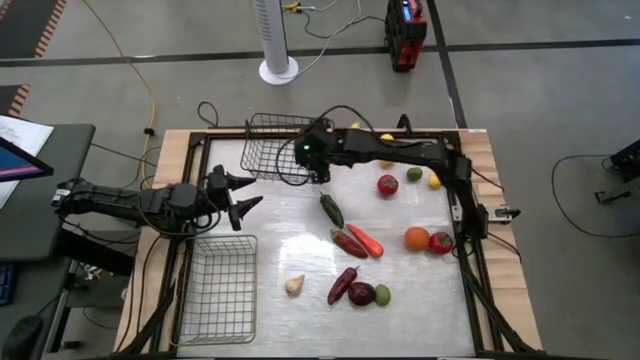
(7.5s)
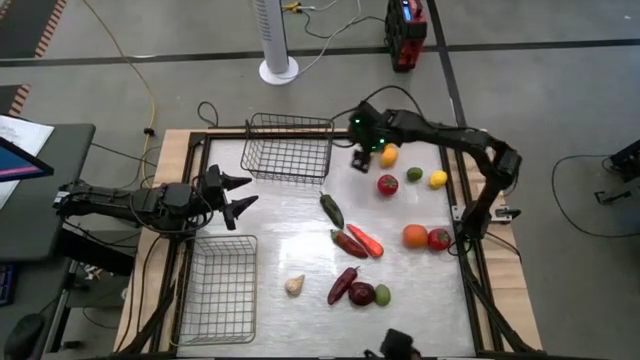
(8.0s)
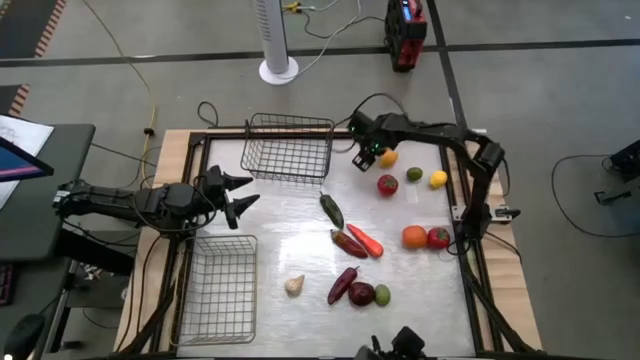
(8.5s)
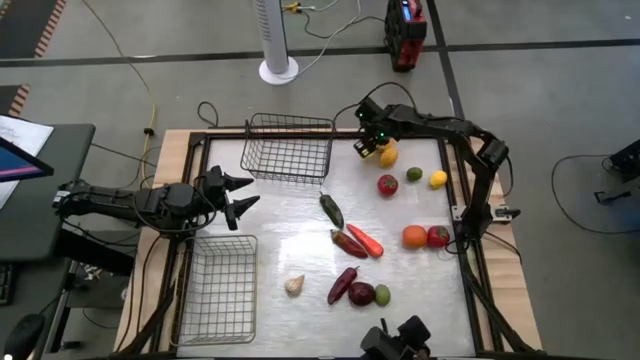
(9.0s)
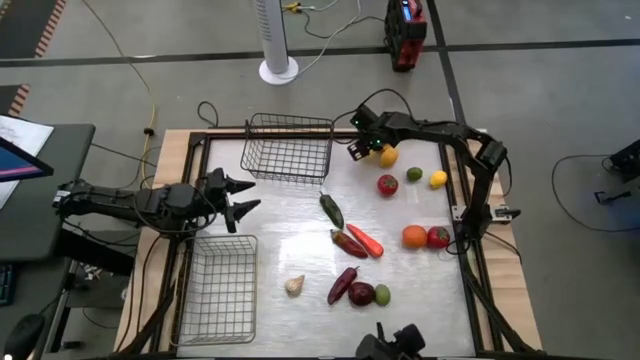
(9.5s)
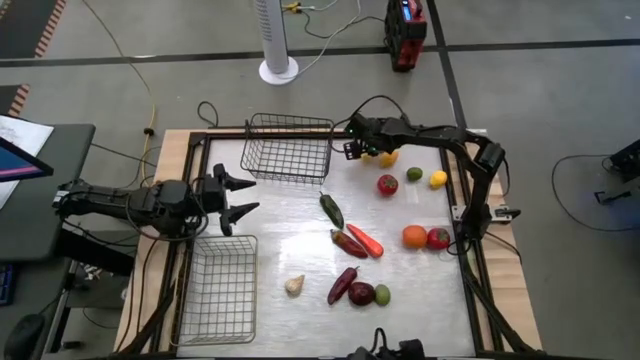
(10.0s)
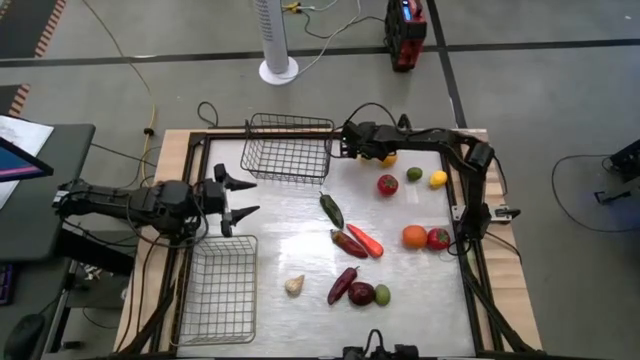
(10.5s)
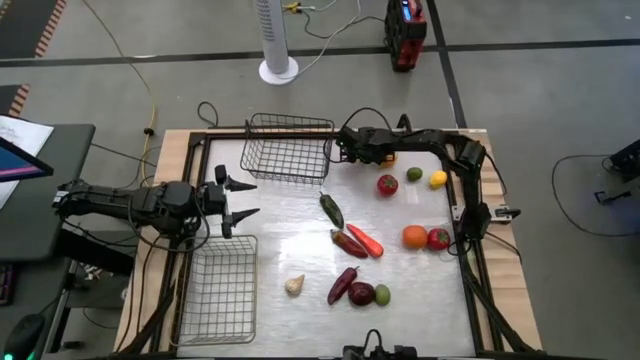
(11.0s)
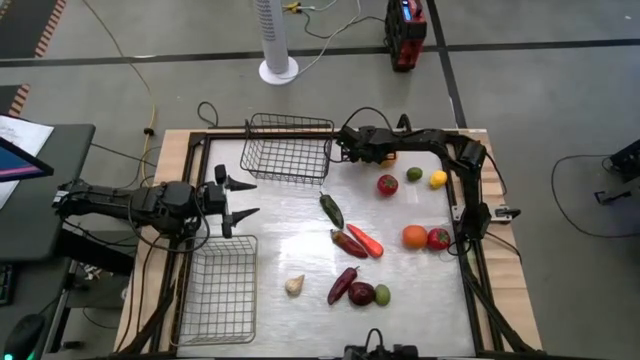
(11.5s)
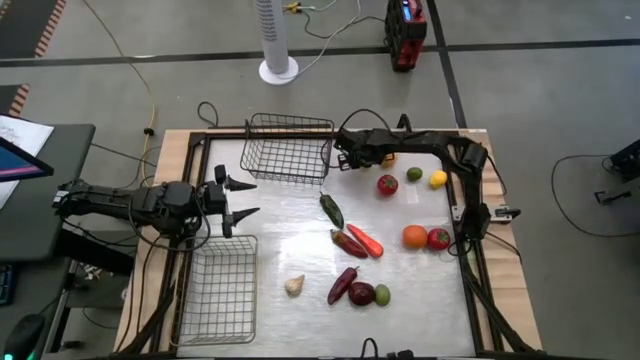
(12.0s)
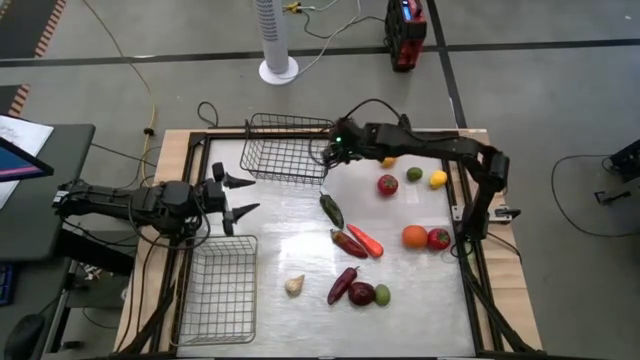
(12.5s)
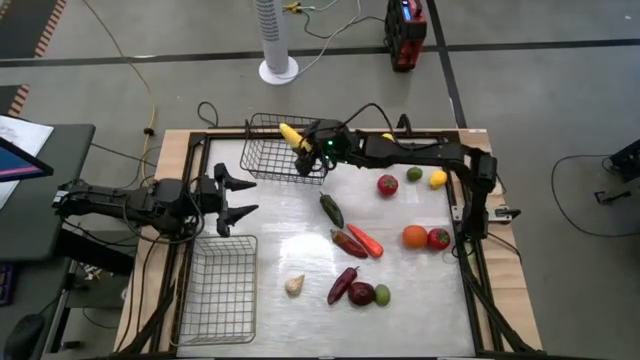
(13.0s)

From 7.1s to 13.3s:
Task: Sort produce into baskets
Put the yellow corn into the black wire basket

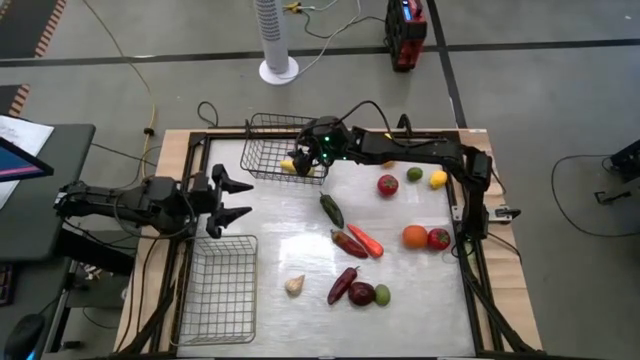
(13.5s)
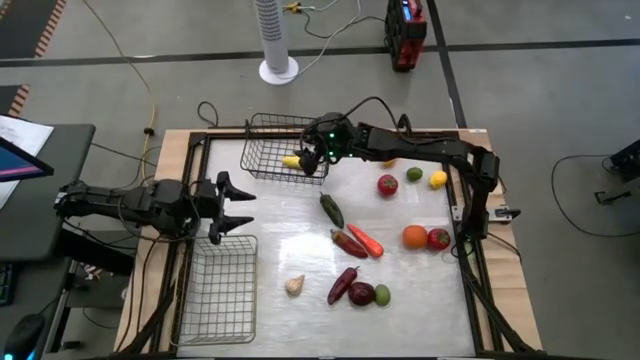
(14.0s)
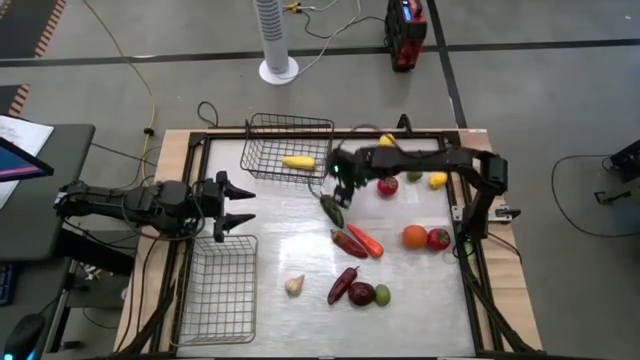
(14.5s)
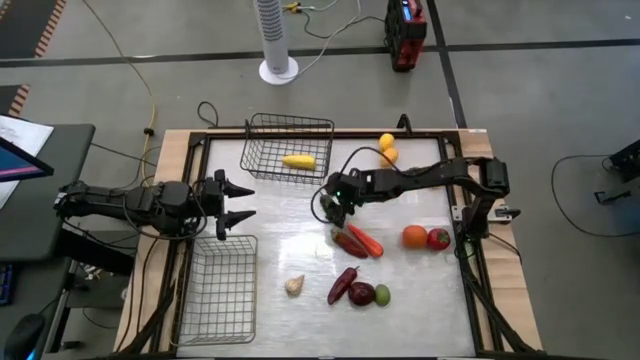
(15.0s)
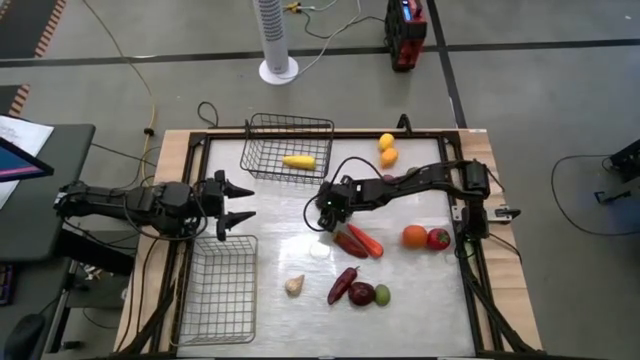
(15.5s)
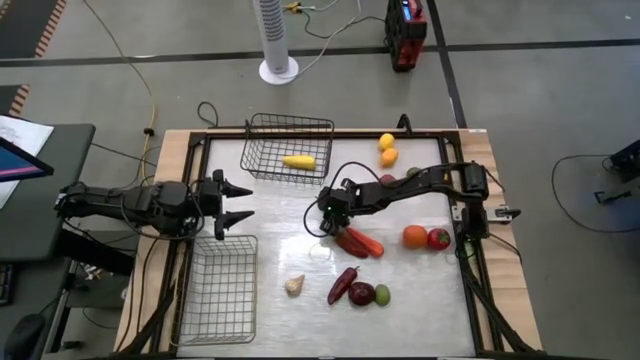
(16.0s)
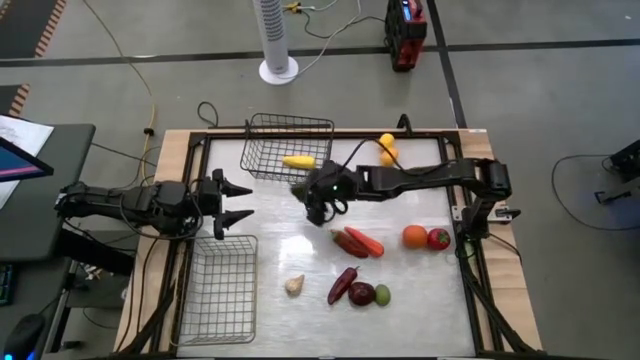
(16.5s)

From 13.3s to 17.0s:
Put the green chili pepper into the black wire basket

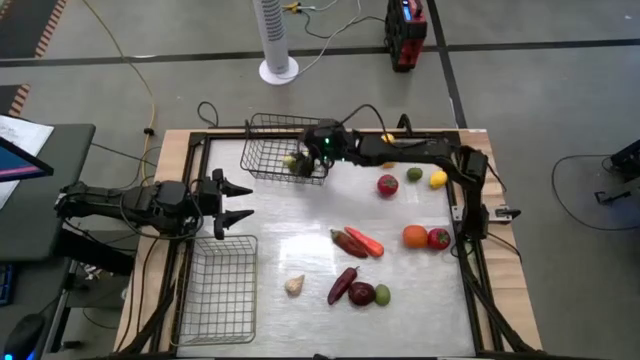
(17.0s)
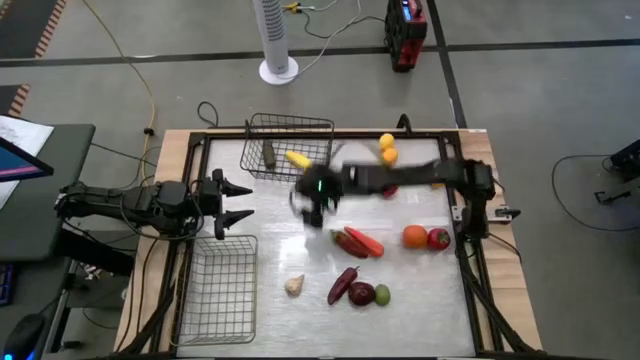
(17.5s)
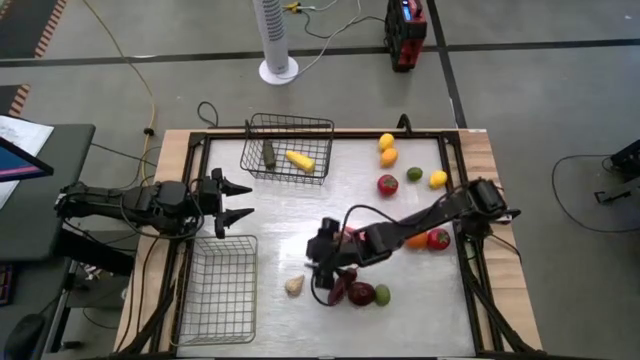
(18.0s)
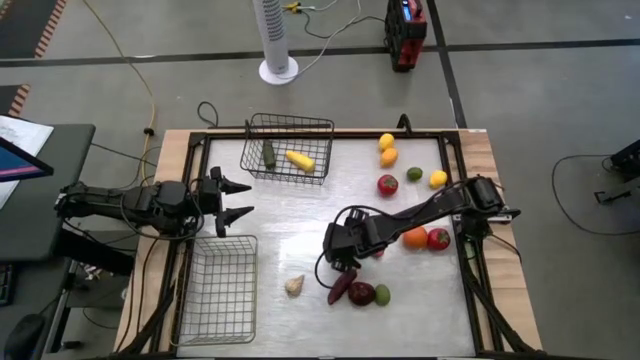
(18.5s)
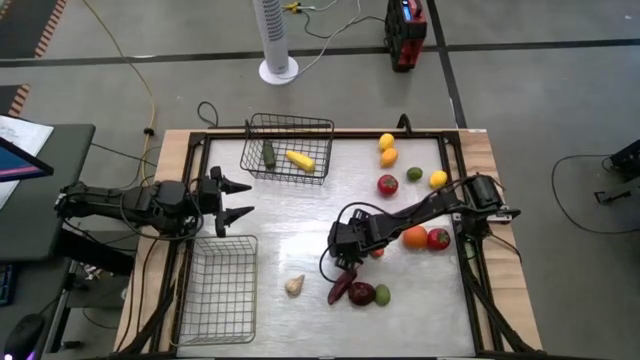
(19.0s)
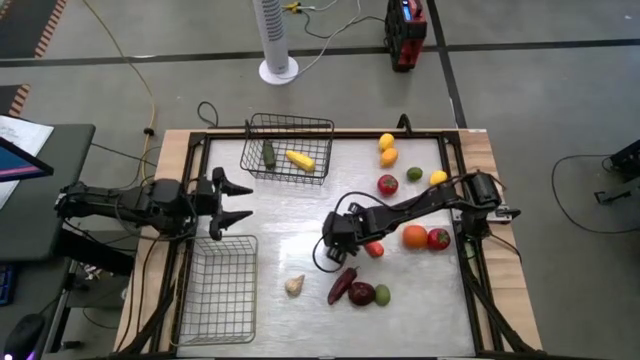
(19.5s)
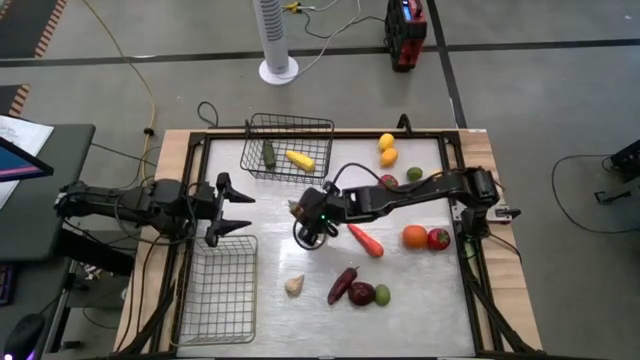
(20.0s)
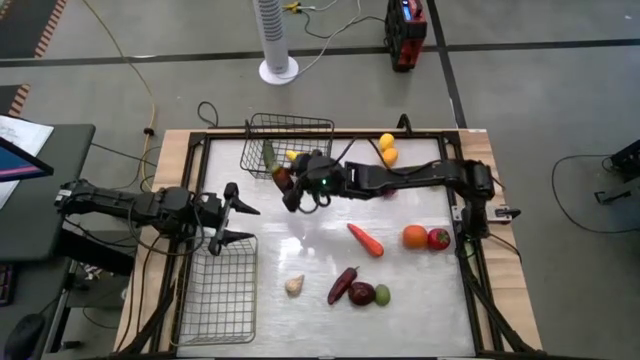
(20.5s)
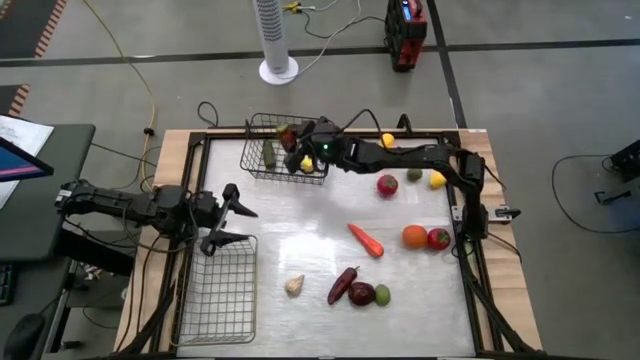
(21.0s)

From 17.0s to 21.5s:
Put the top red chili pepper into the black wire basket

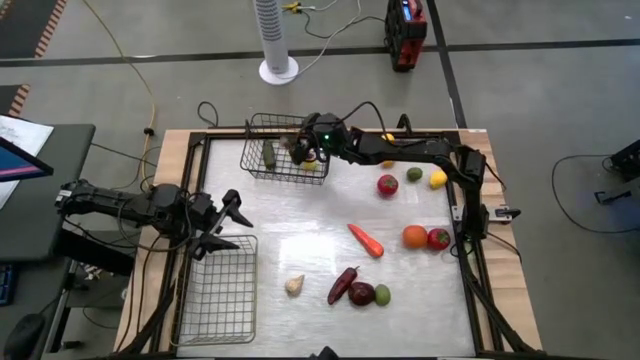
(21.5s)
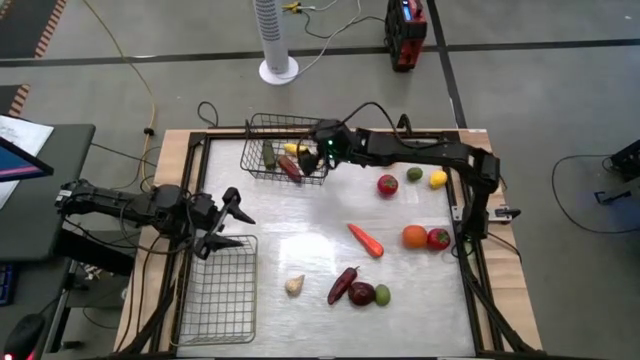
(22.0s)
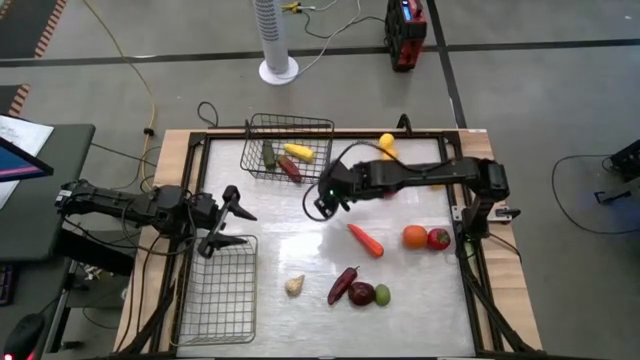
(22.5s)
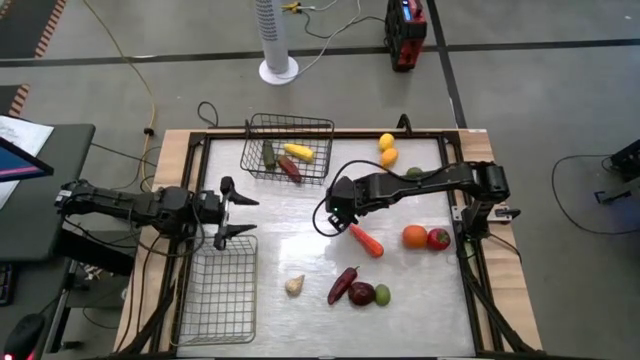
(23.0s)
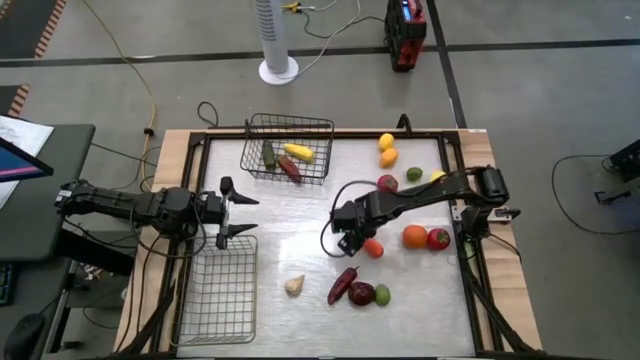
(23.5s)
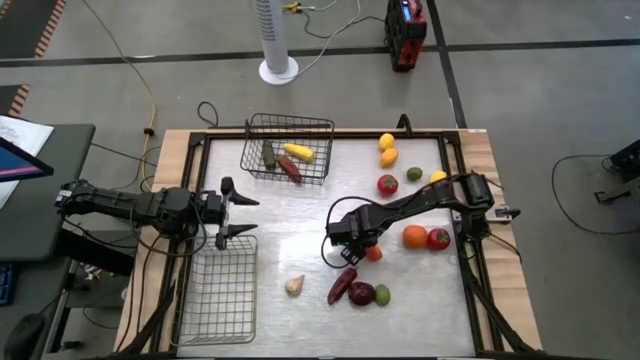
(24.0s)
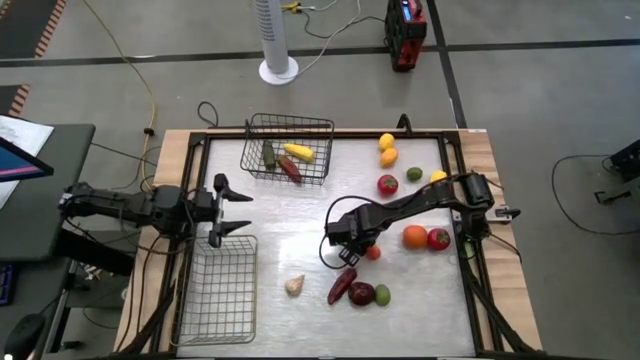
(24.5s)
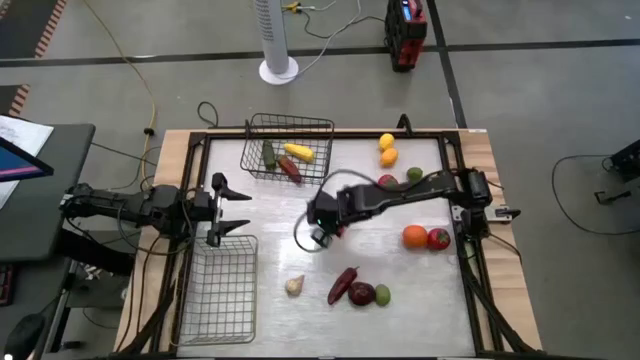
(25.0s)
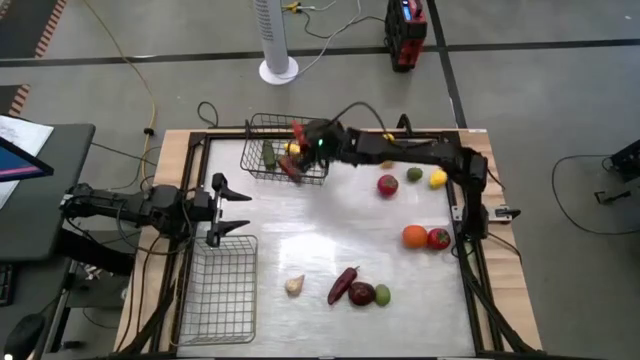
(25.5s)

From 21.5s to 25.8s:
Put the orange carrot into the black wire basket

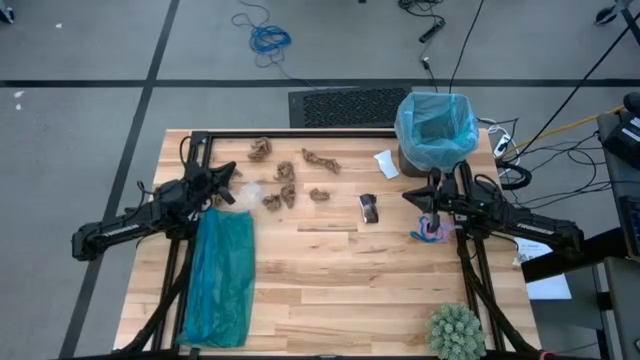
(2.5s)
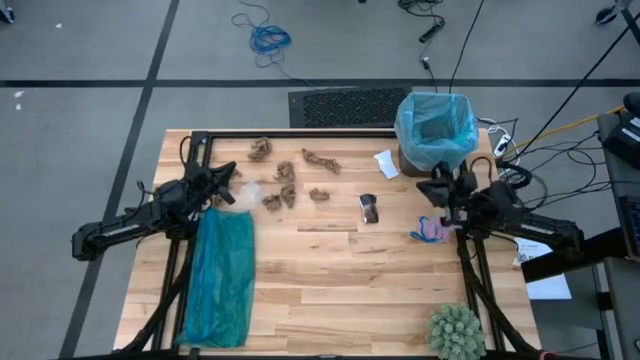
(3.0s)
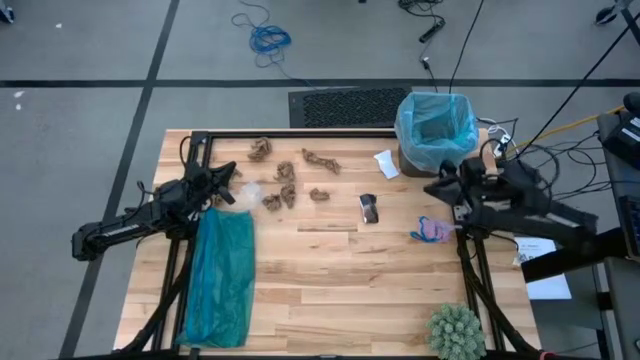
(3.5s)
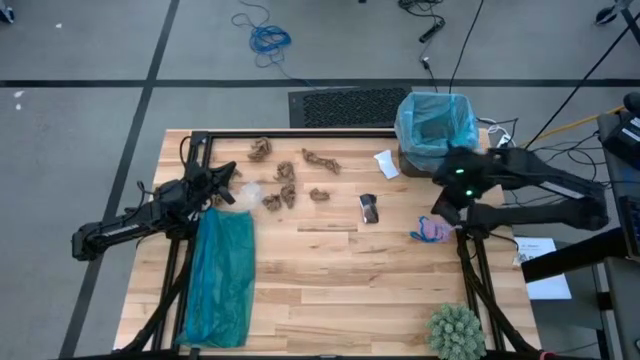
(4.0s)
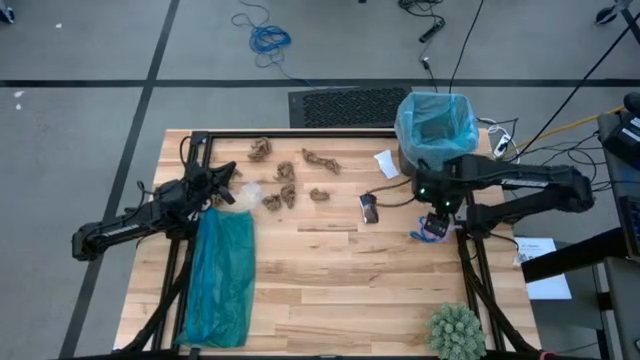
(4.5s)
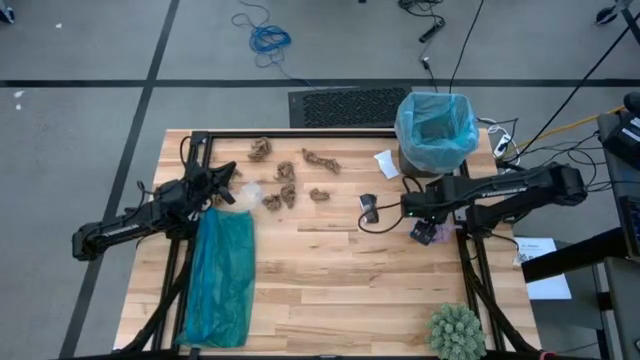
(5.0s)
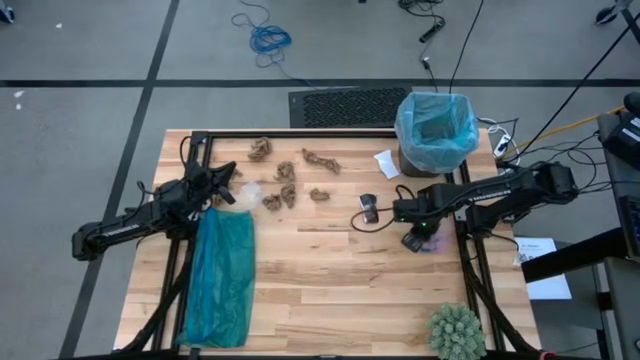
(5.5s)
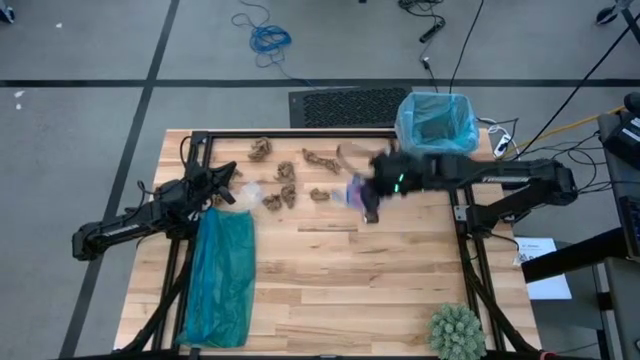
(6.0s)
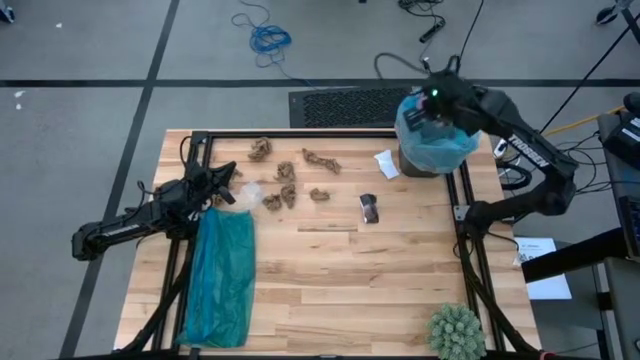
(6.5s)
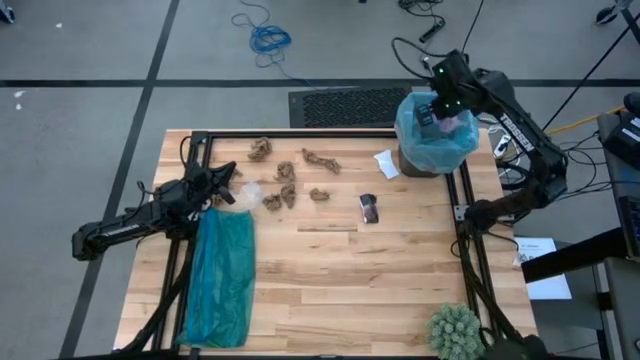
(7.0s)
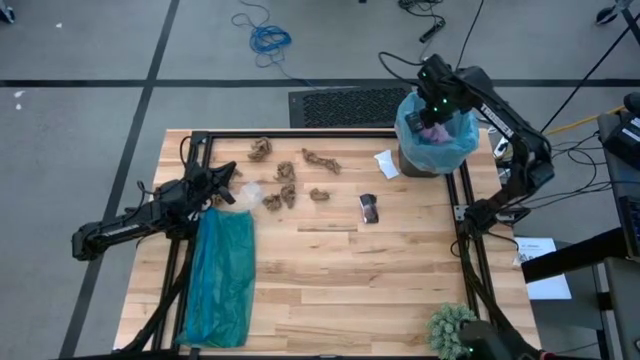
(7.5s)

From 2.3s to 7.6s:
Task: place trash/remove bag and relplace
Put the pink trash bag into the trash bin
